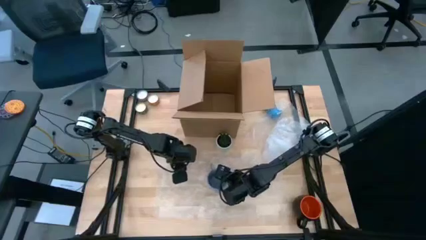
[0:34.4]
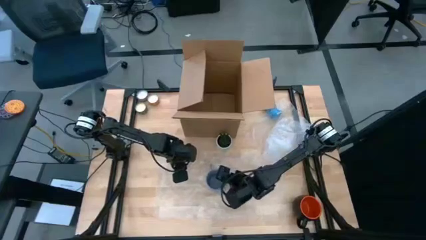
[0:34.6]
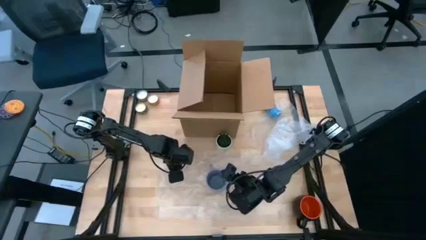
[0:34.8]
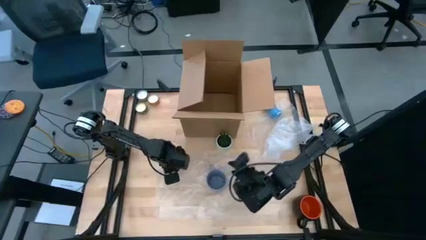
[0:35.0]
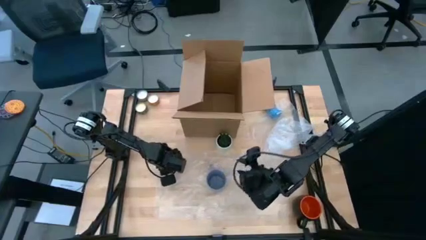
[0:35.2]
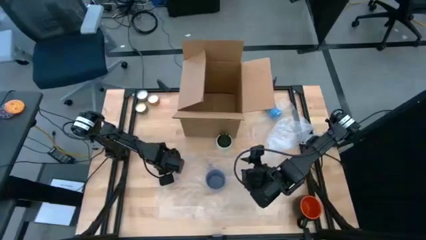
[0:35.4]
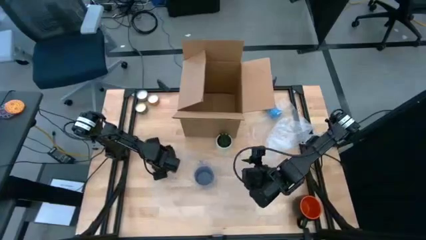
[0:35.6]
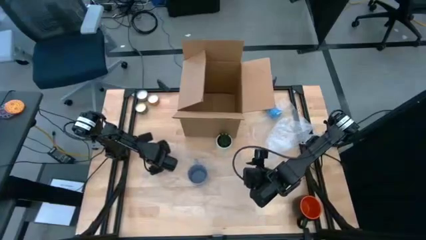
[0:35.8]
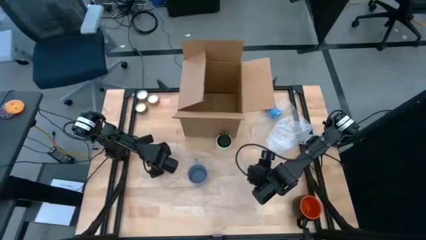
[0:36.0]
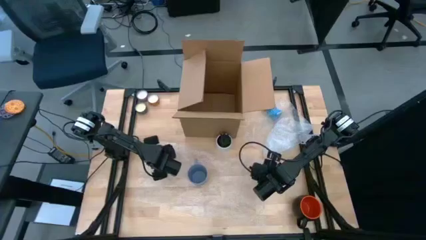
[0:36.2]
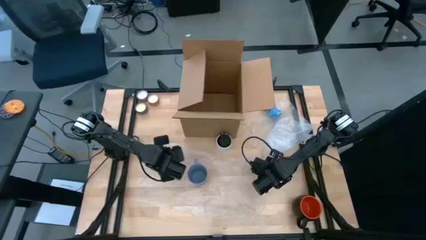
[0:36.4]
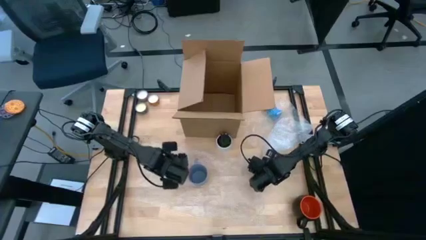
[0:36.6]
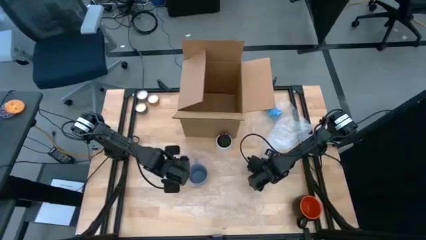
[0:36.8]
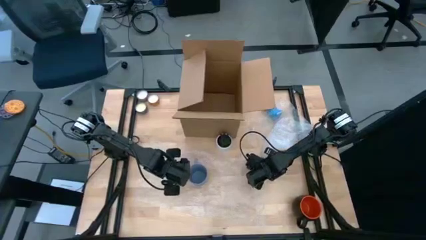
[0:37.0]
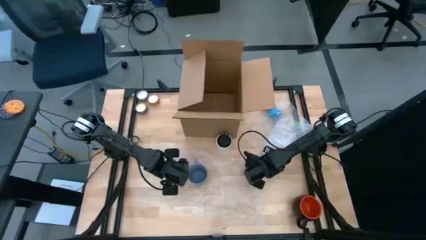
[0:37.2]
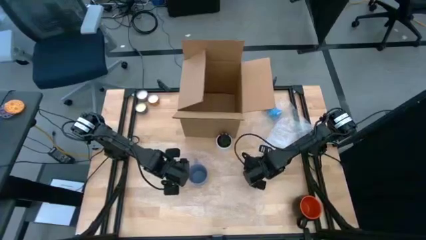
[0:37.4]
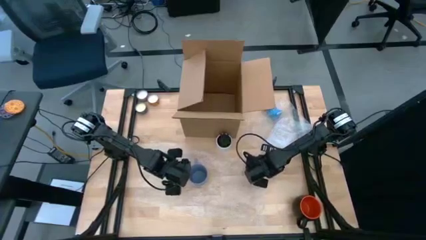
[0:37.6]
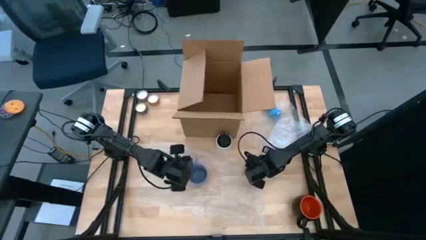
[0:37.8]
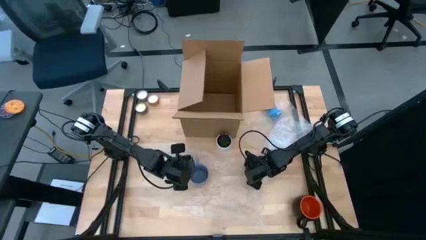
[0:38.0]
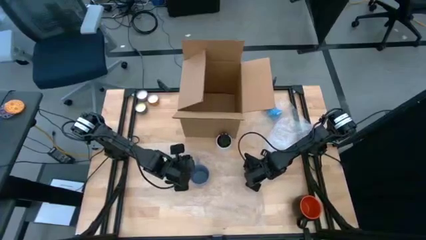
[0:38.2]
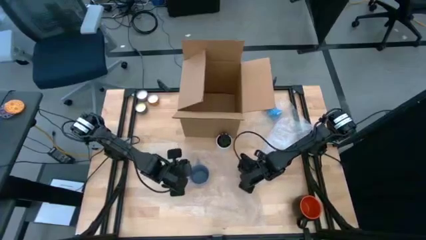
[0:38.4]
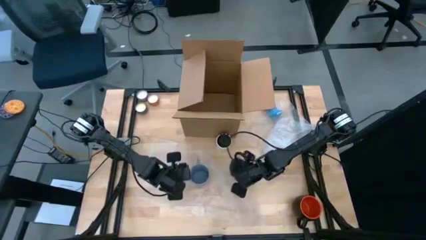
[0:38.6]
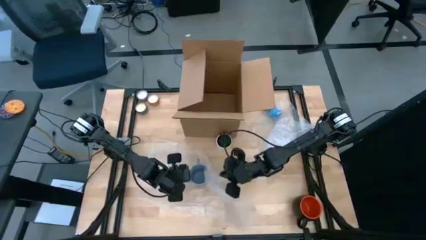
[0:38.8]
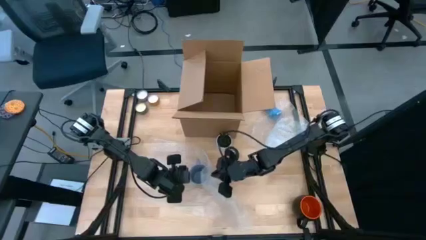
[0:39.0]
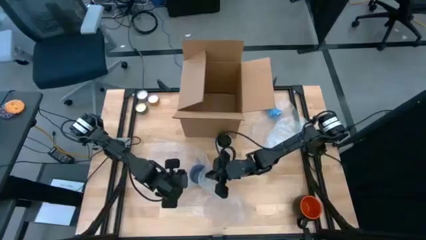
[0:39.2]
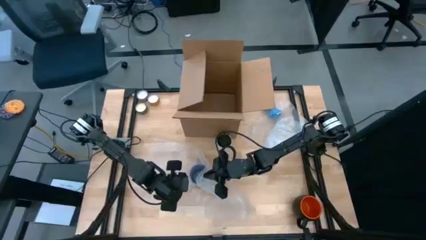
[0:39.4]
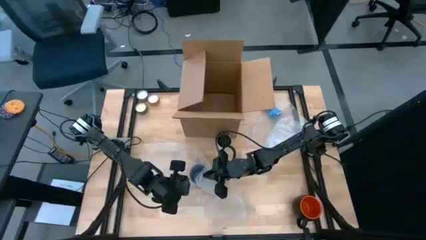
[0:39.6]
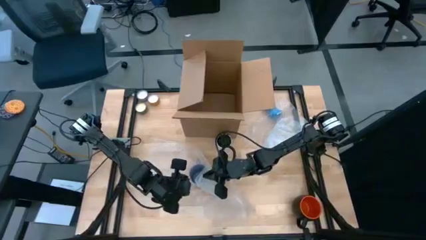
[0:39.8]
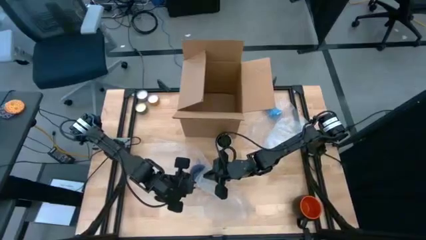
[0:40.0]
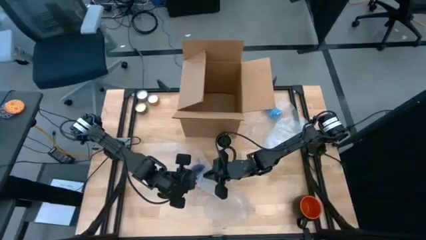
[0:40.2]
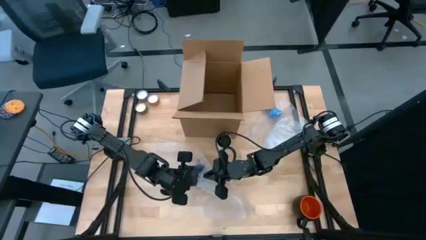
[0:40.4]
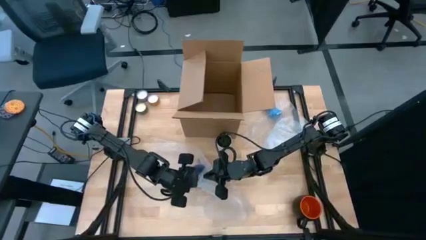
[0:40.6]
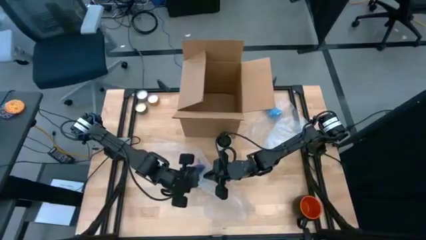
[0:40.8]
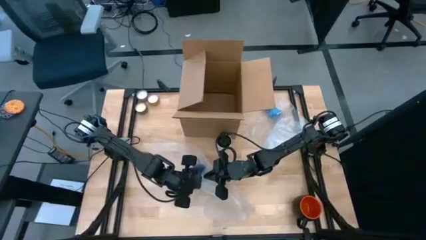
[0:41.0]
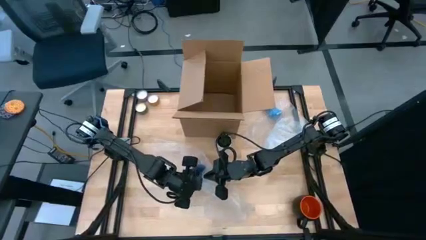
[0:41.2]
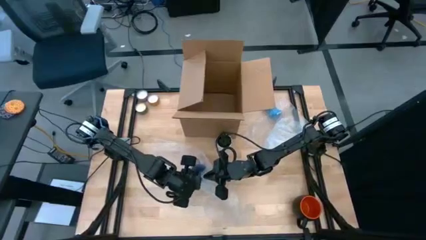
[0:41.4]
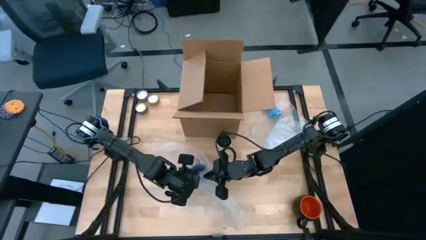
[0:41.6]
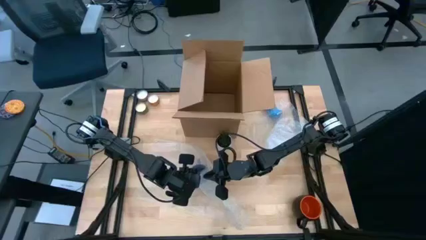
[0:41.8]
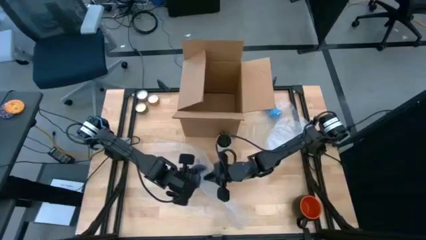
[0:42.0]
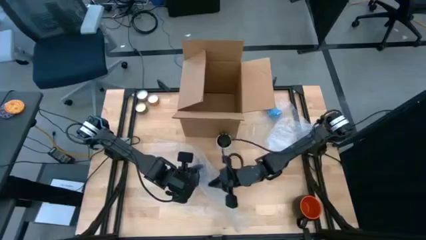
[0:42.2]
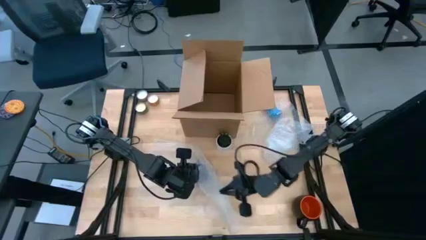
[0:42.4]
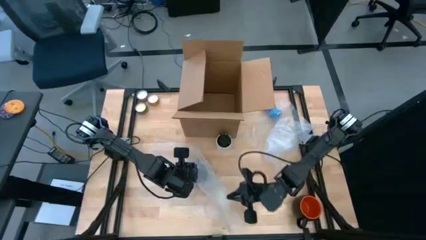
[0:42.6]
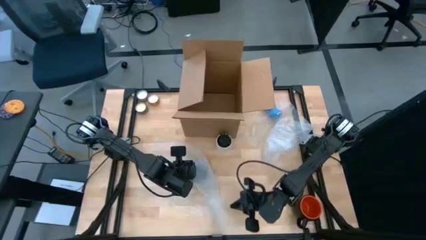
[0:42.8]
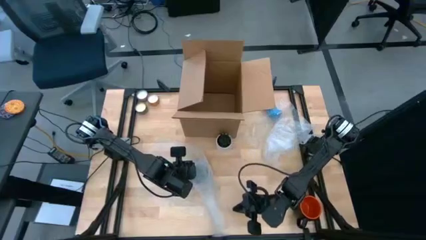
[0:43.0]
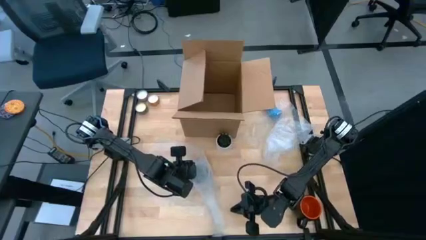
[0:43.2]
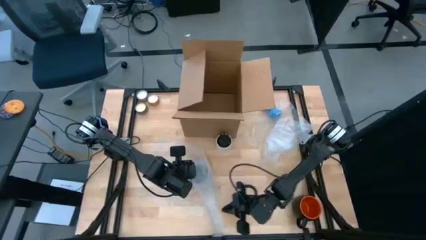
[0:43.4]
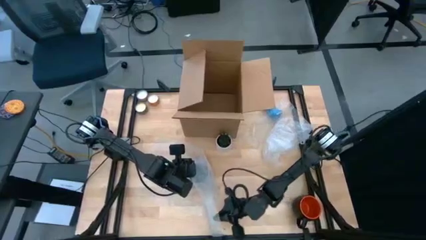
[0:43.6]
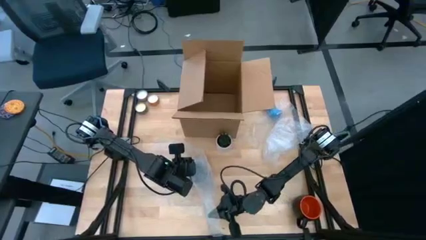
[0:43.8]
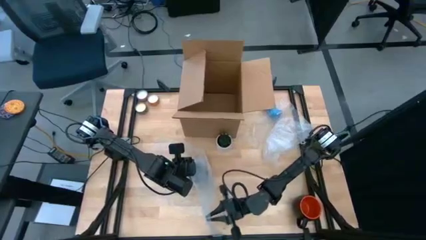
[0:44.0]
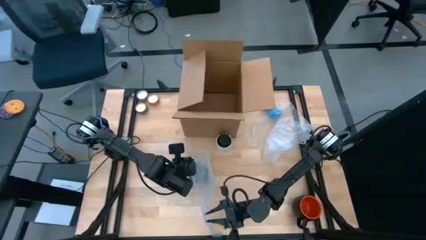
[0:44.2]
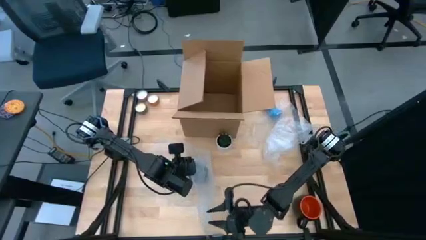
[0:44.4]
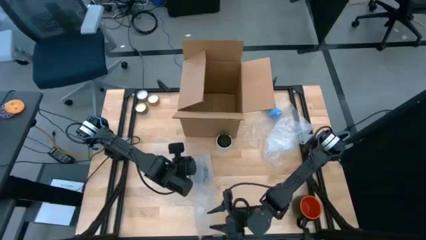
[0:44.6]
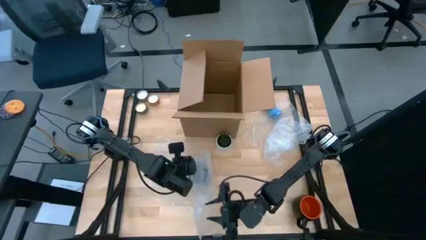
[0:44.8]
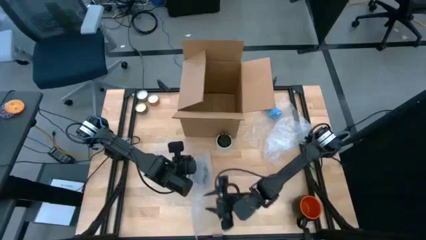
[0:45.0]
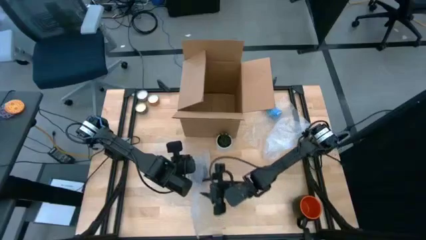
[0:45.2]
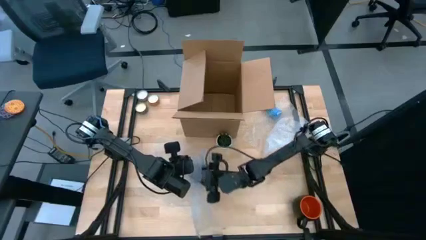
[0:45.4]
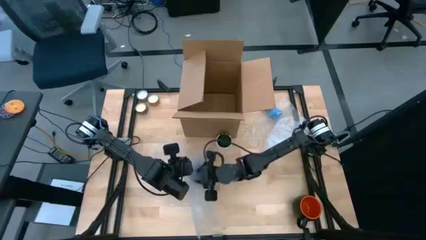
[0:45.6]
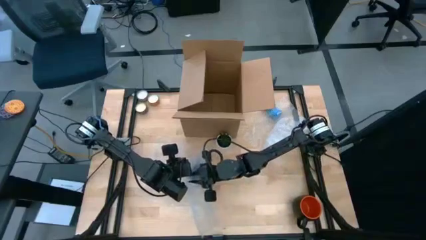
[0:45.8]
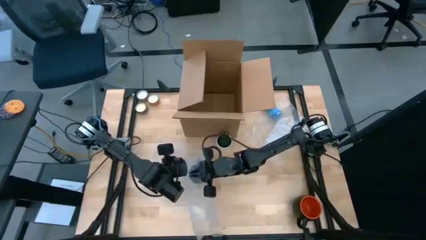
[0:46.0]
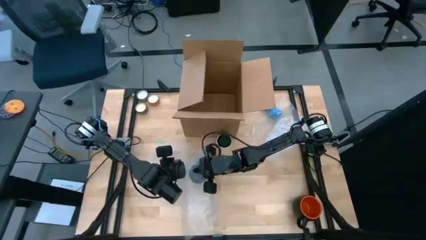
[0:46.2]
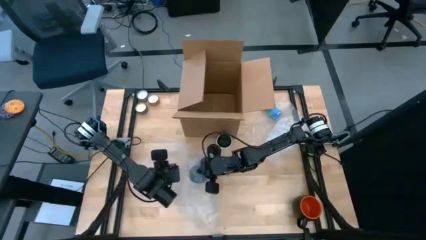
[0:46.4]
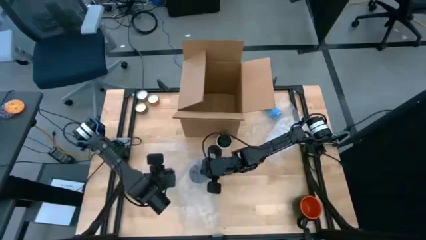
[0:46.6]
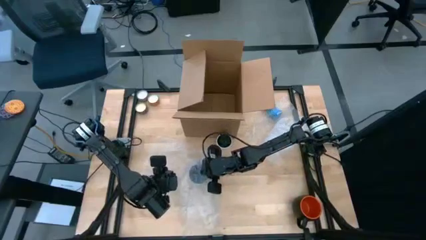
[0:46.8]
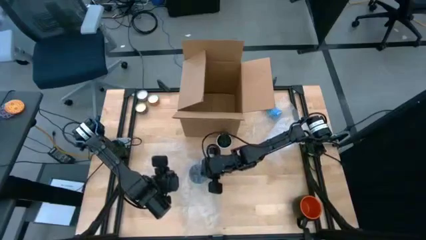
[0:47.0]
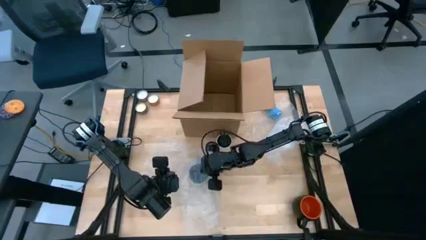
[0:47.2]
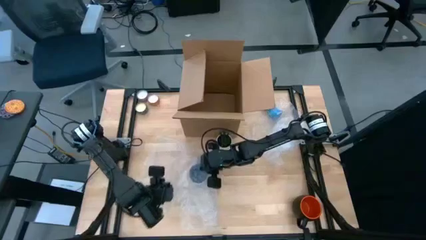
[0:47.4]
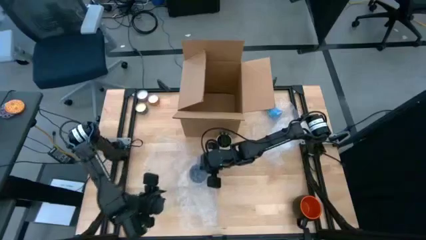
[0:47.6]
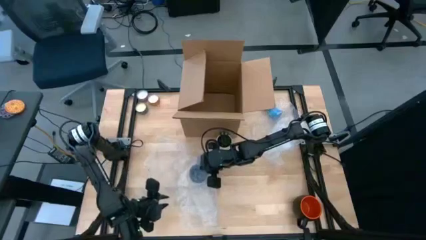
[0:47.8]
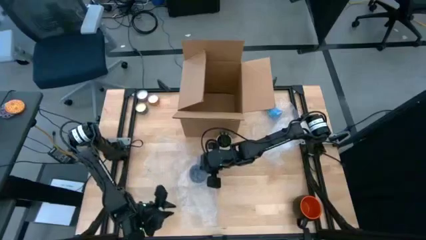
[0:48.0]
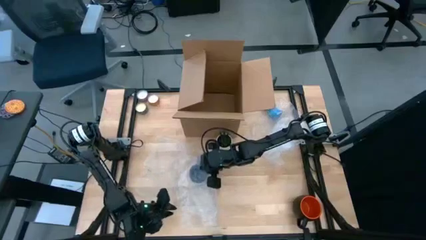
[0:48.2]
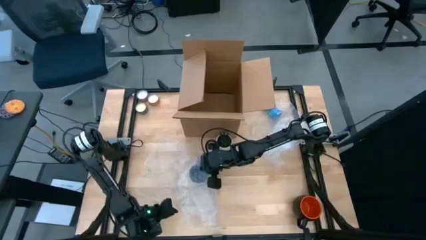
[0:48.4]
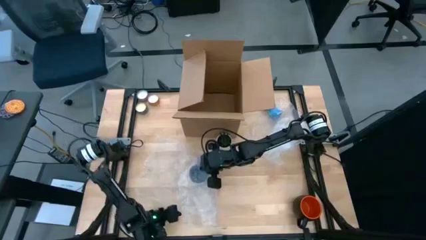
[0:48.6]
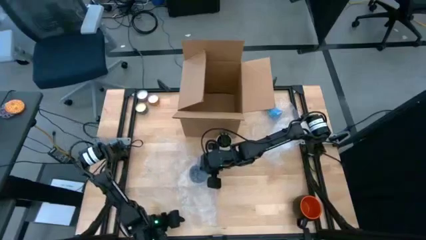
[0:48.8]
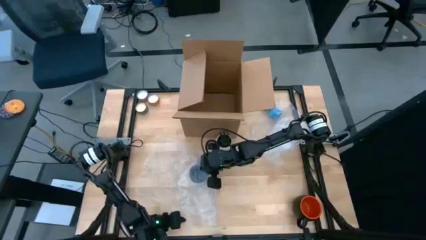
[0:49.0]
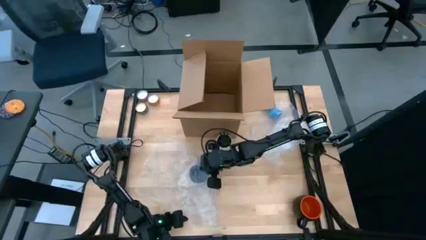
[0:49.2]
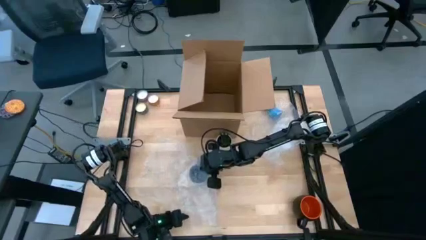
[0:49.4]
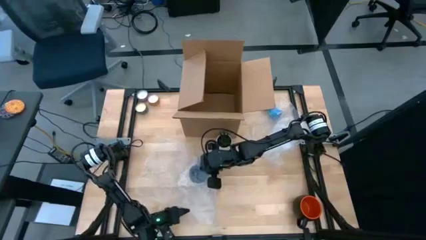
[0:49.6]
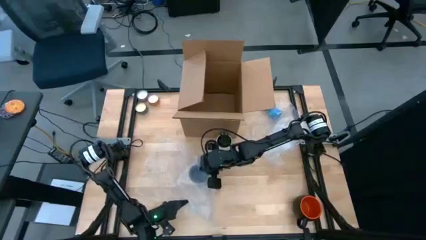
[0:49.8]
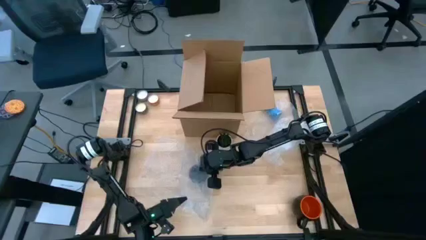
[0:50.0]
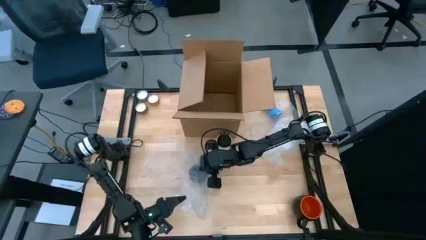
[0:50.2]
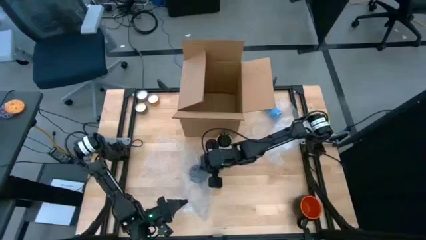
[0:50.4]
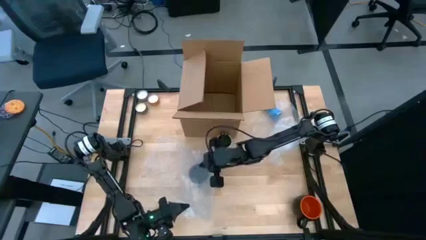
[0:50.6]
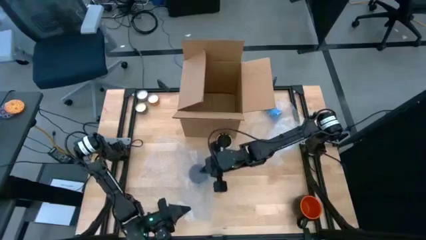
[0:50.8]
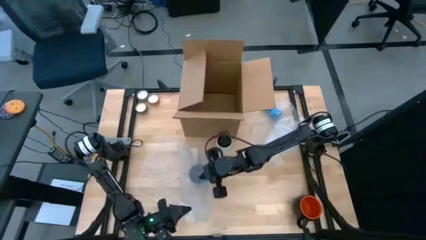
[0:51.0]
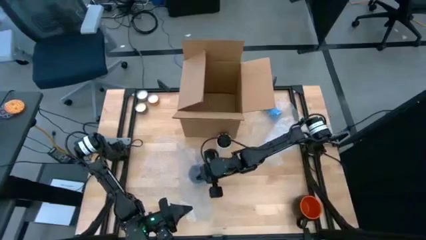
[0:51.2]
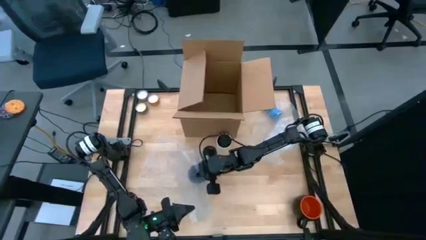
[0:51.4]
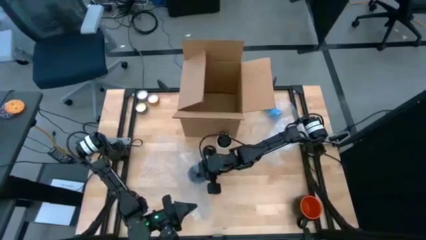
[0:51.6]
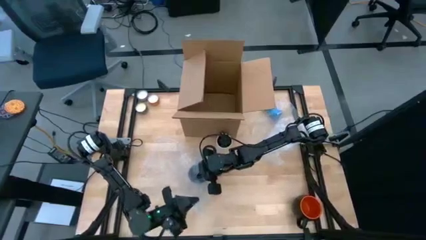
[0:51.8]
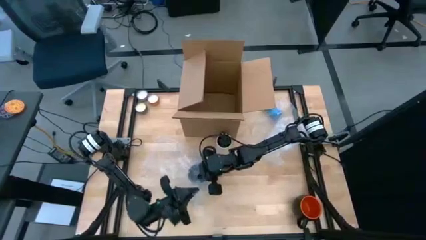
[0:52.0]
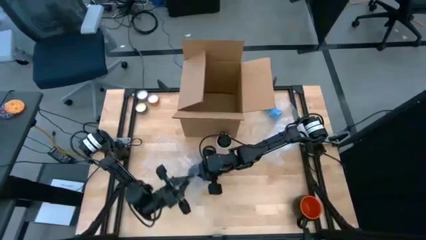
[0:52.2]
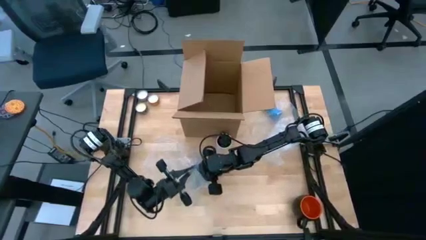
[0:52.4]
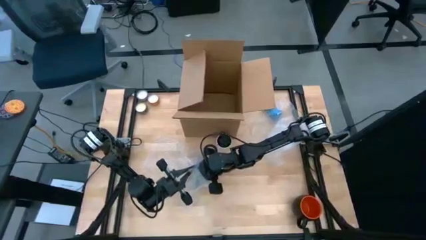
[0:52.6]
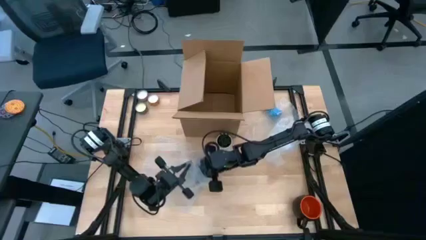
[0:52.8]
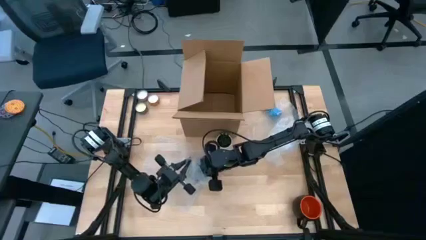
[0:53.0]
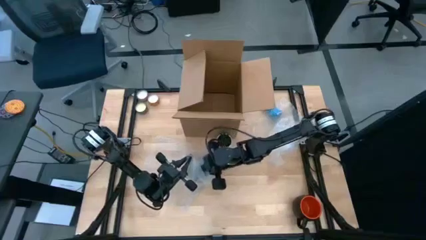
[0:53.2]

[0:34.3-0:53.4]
Task: wrap mug
Wrap the blue cup with the transparent bubble wrap
